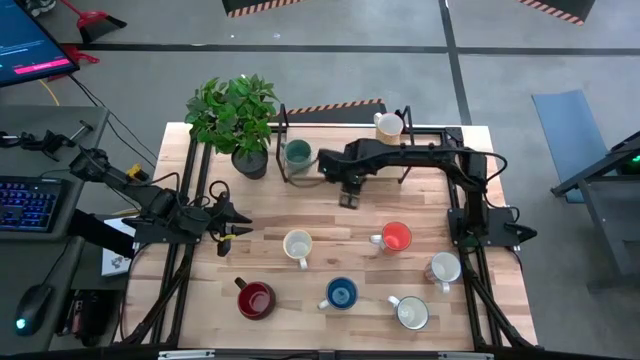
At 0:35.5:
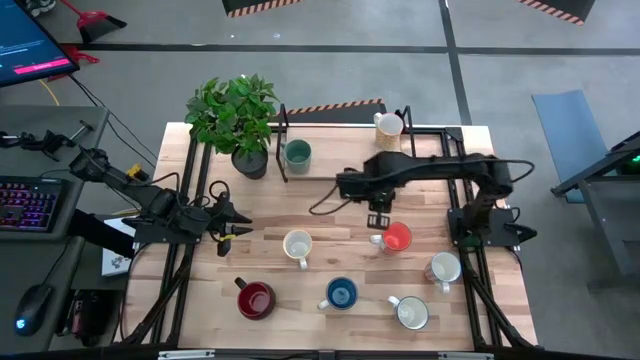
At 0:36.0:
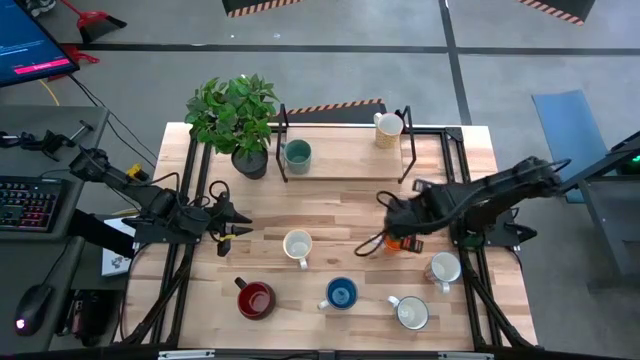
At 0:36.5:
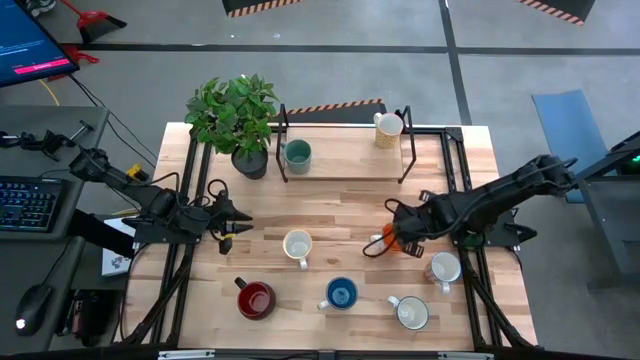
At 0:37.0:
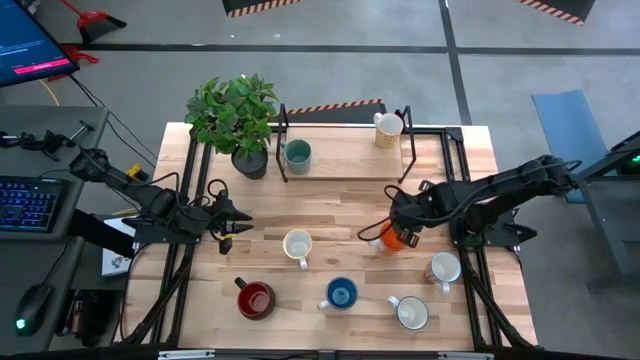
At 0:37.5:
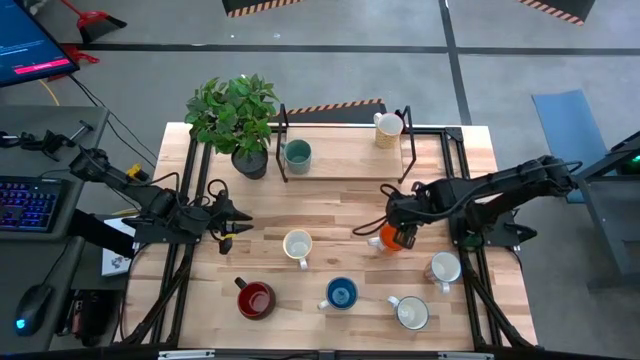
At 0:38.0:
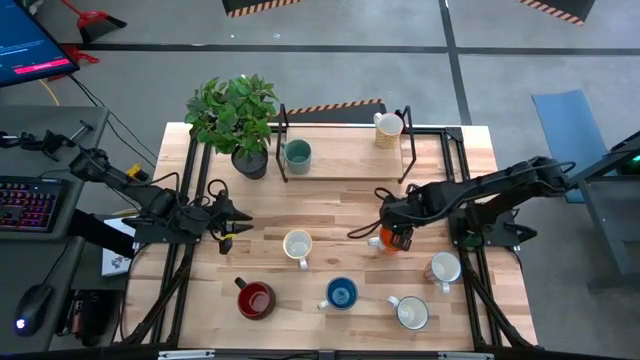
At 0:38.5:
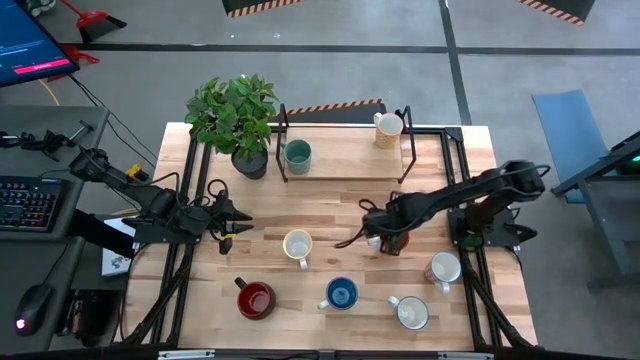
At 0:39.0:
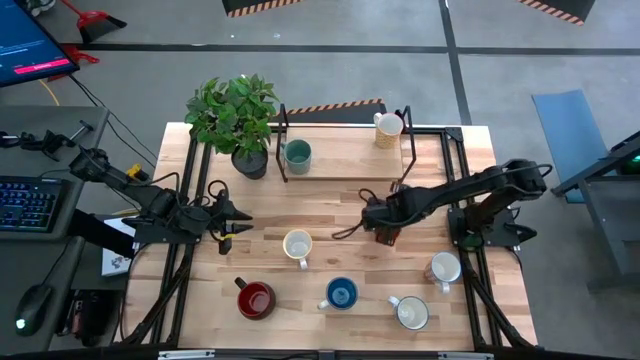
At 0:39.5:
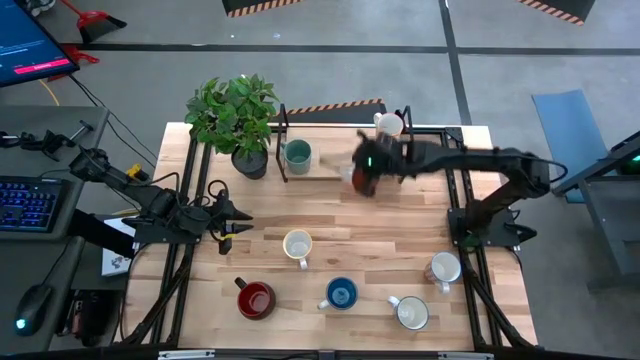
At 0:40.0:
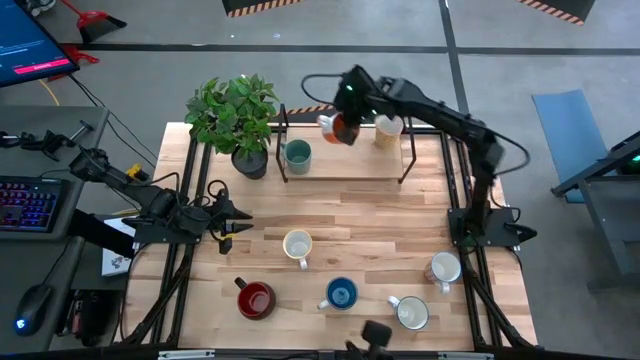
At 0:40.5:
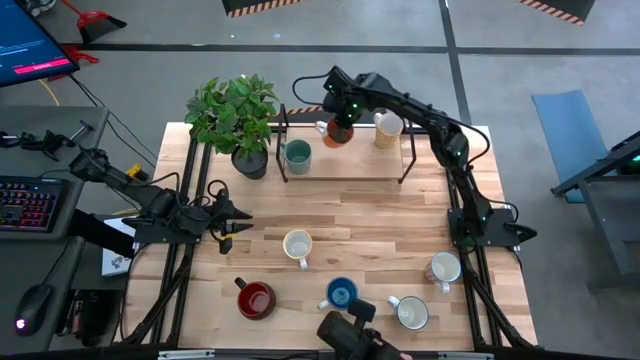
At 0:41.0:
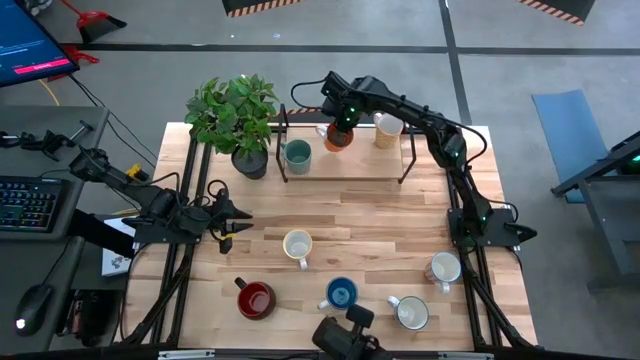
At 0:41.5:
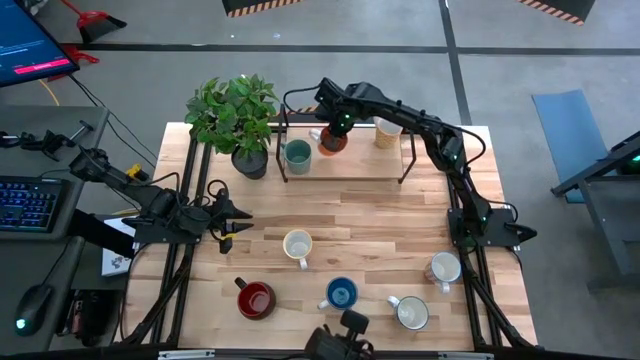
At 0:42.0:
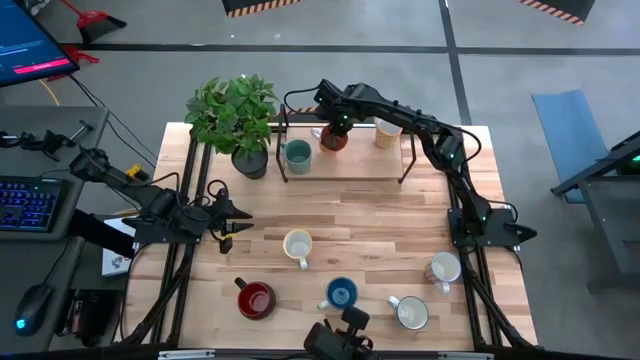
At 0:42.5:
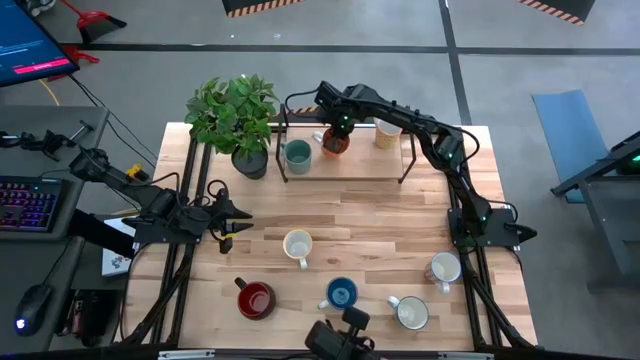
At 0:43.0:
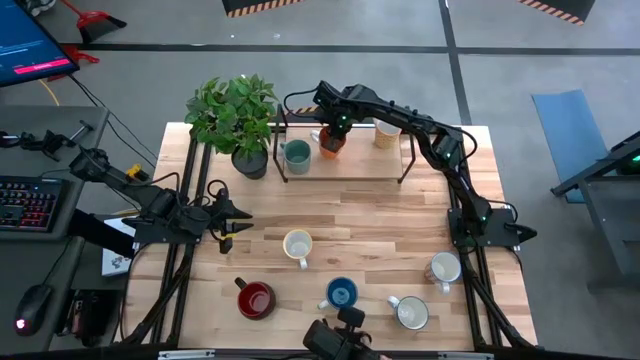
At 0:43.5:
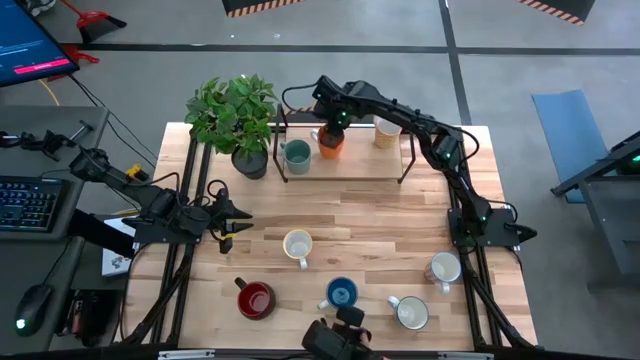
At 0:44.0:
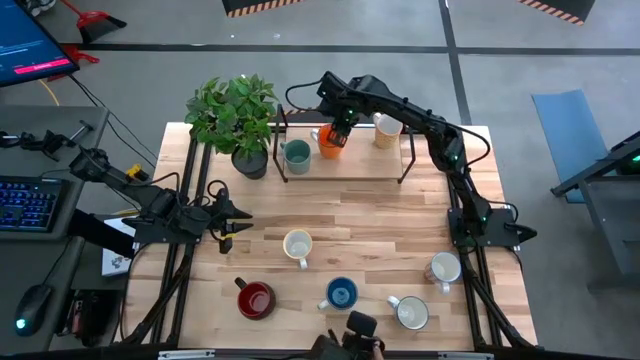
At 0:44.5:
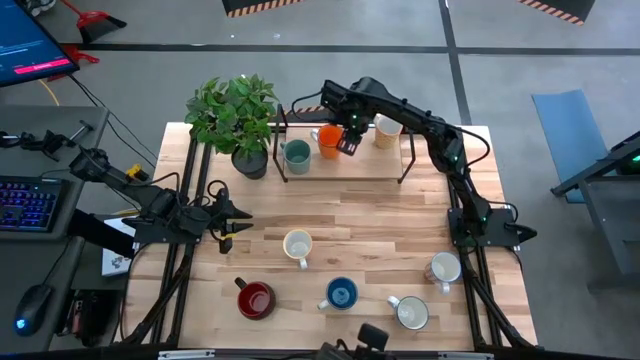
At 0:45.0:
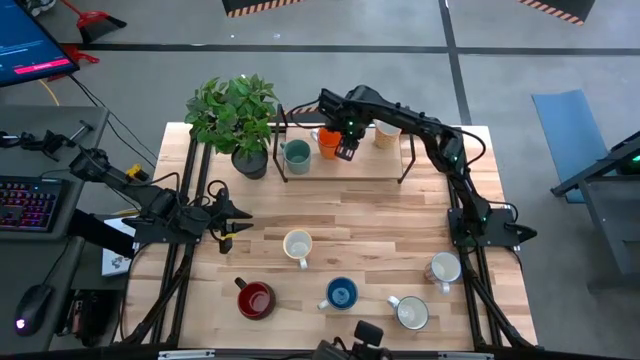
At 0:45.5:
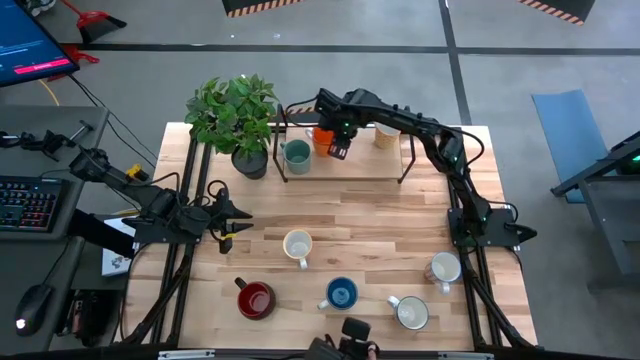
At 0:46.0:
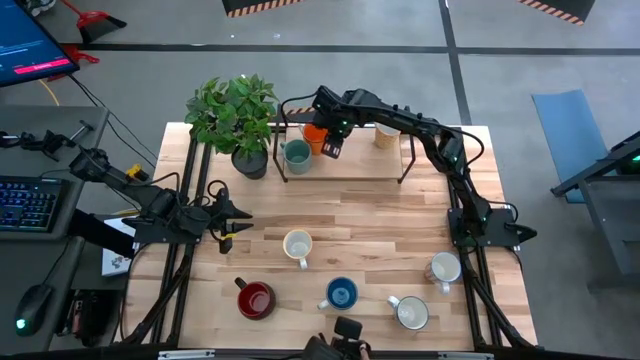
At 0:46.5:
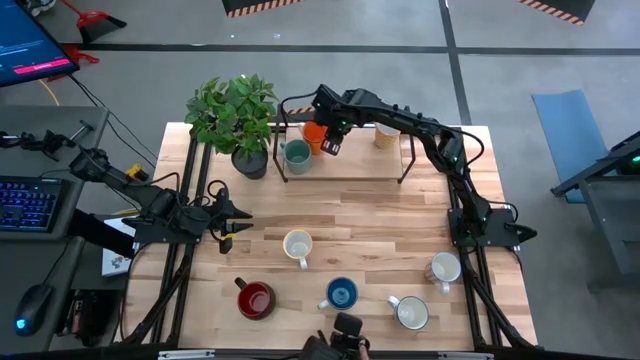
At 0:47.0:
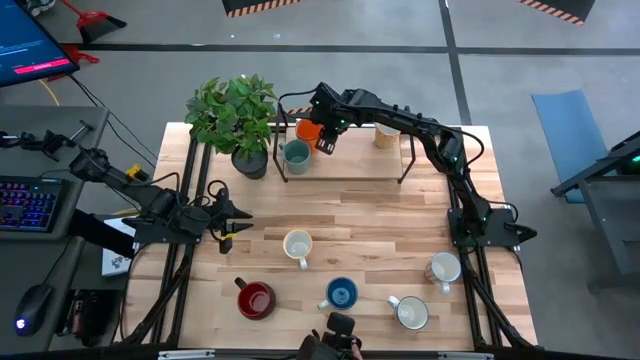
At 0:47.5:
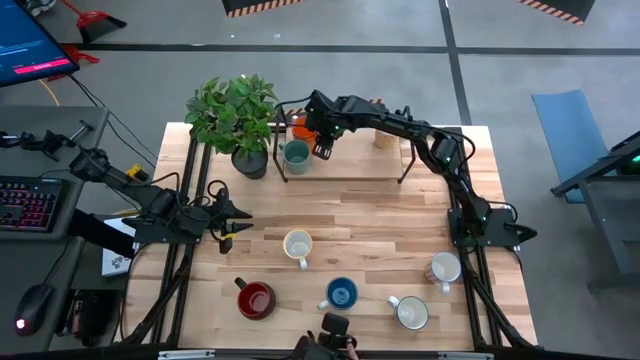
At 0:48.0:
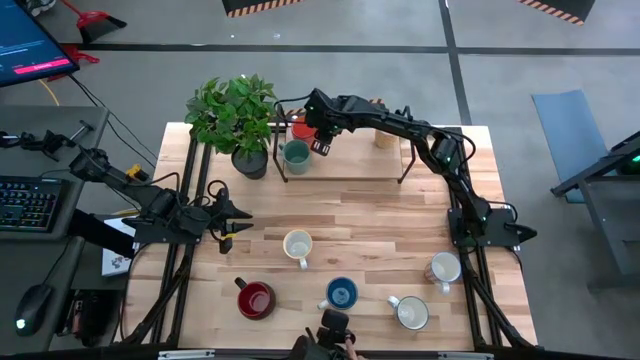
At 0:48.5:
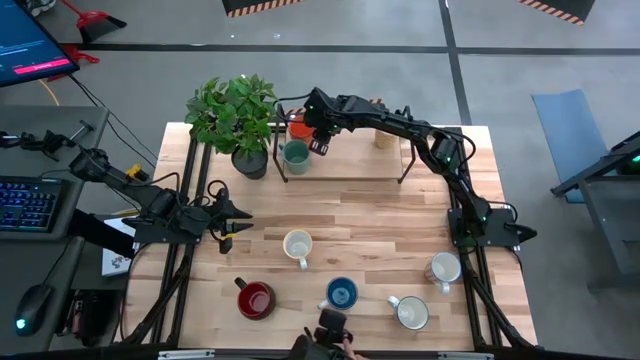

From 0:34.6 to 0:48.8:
Task: Place coffee mugs
Put the orange mug on the shelf

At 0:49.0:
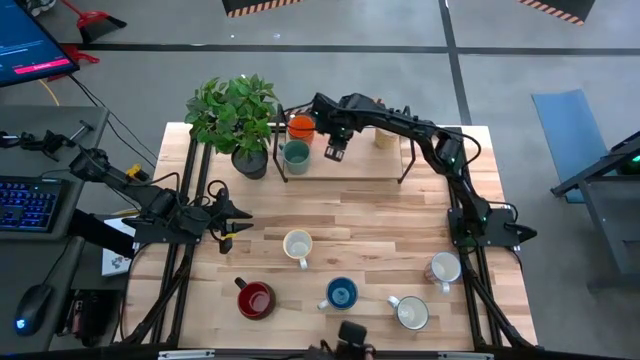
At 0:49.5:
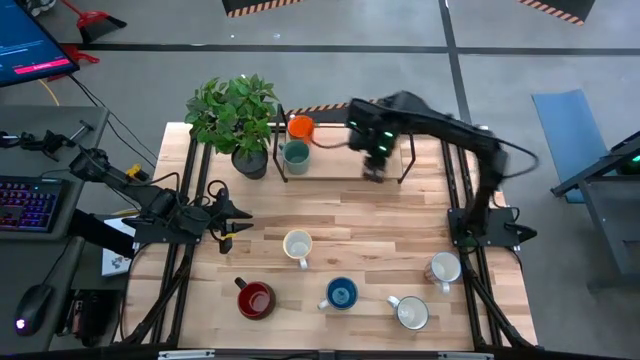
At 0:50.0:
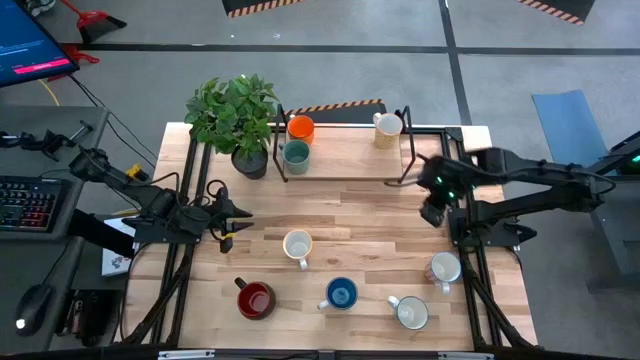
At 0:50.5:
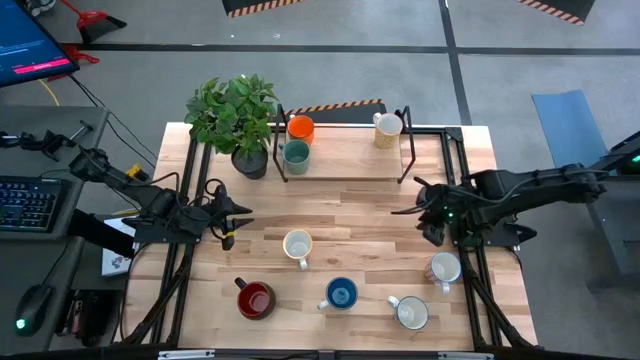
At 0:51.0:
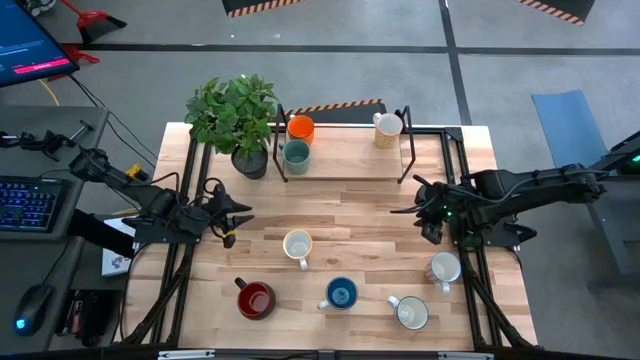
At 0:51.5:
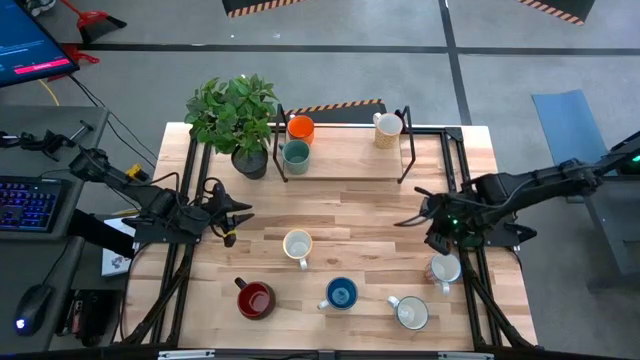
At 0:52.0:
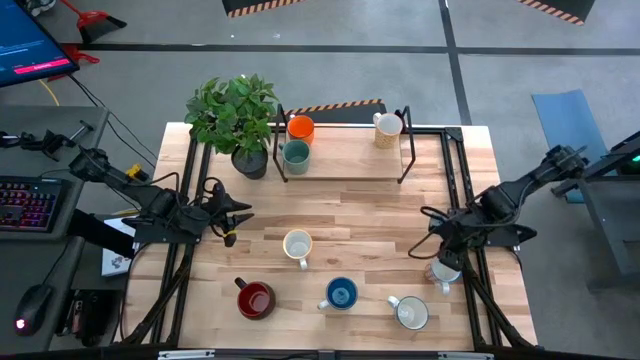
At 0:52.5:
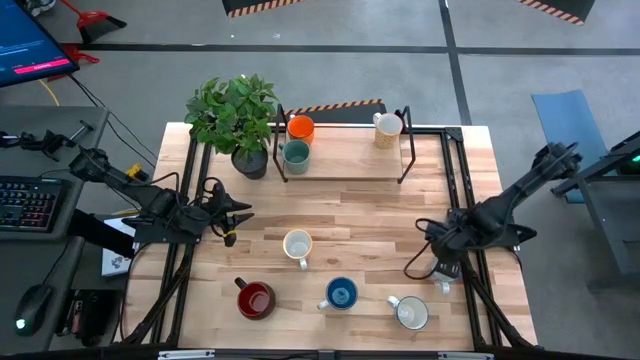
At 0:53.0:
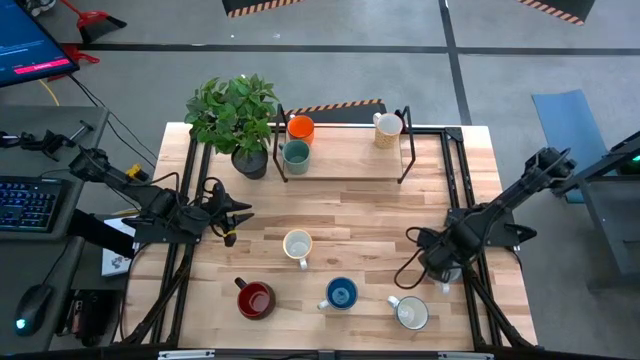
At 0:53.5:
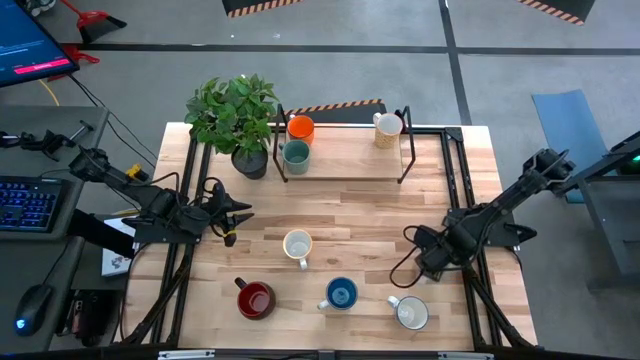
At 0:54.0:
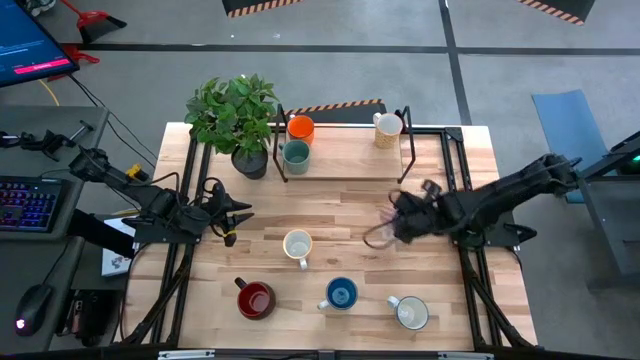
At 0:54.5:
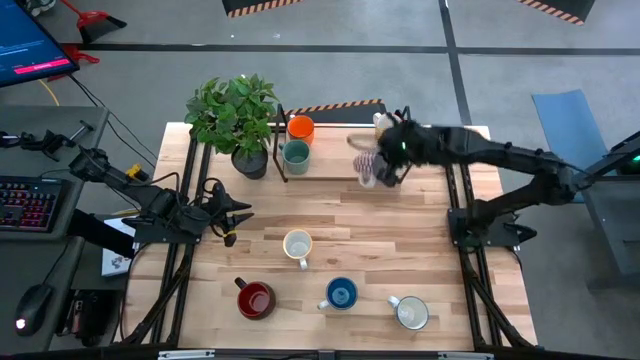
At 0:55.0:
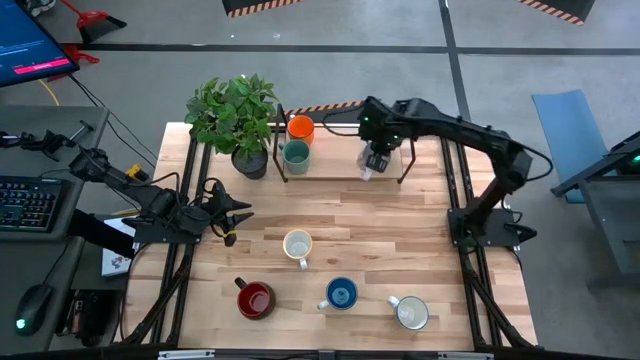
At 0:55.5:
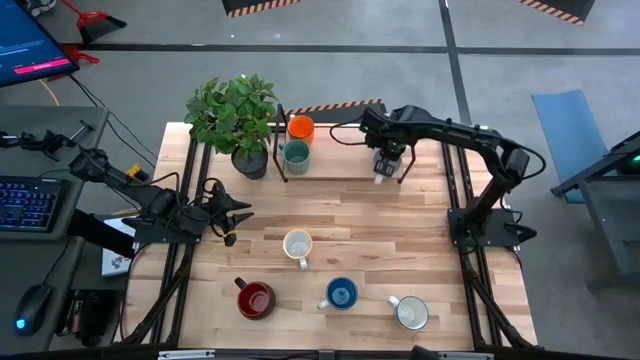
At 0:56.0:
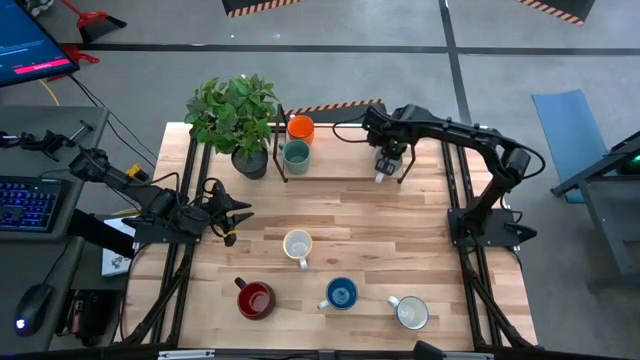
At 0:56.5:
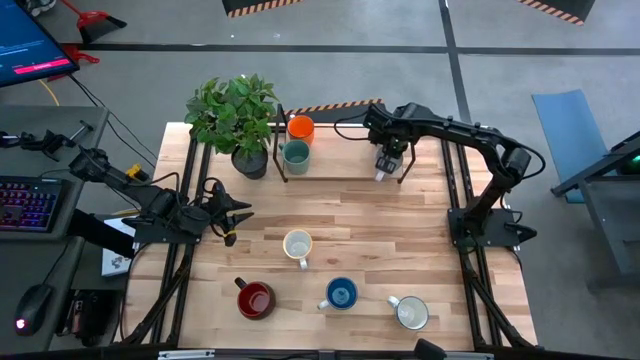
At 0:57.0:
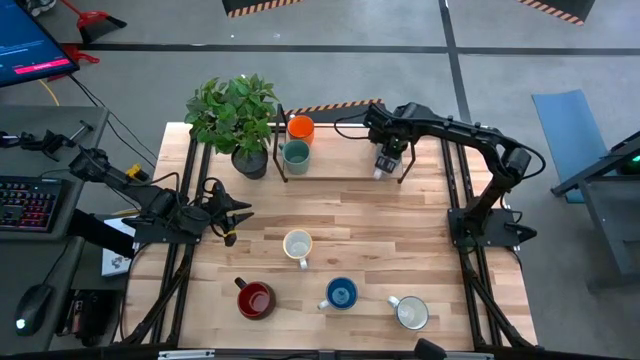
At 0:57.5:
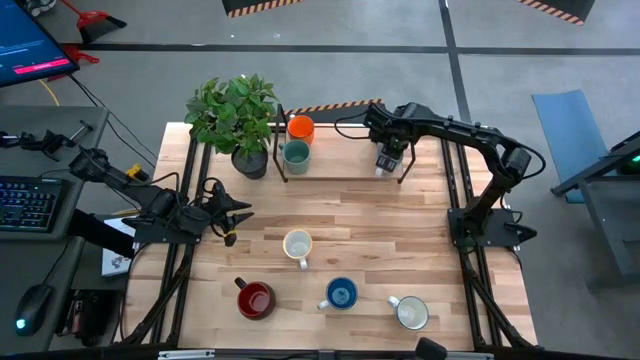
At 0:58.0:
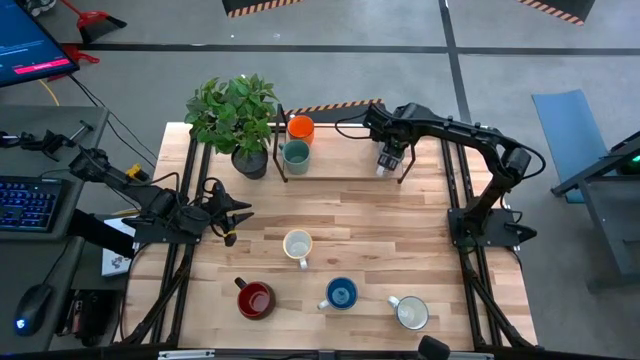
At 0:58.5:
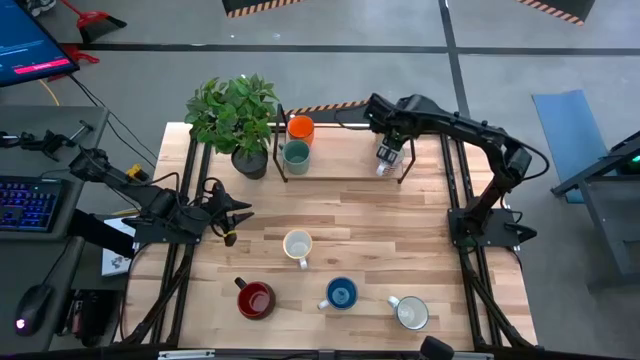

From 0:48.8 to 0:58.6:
Put the patterned red mug on the shelf
